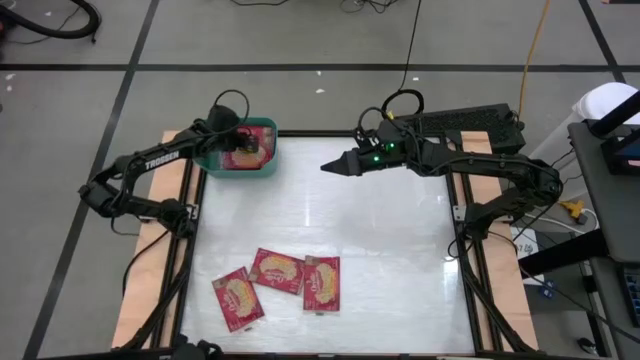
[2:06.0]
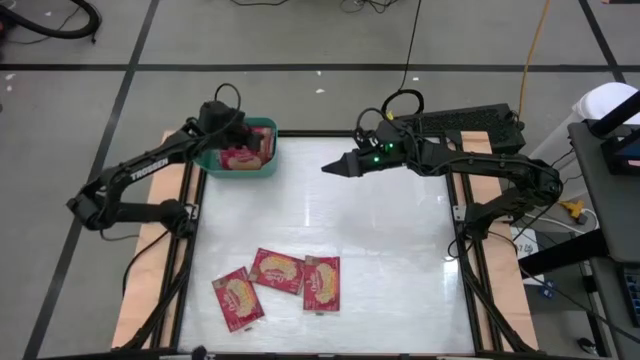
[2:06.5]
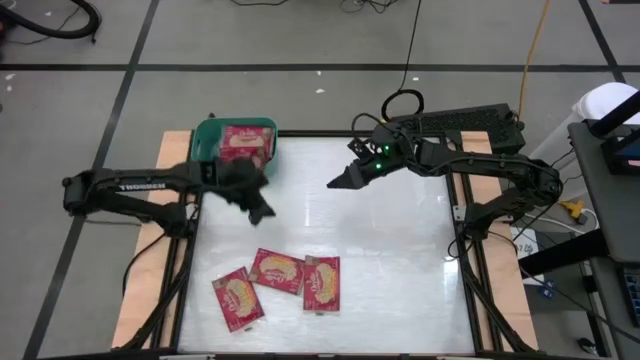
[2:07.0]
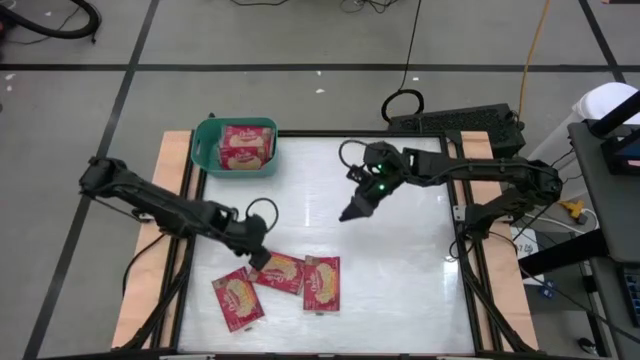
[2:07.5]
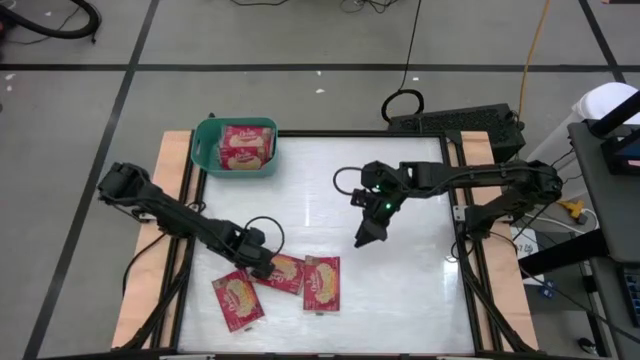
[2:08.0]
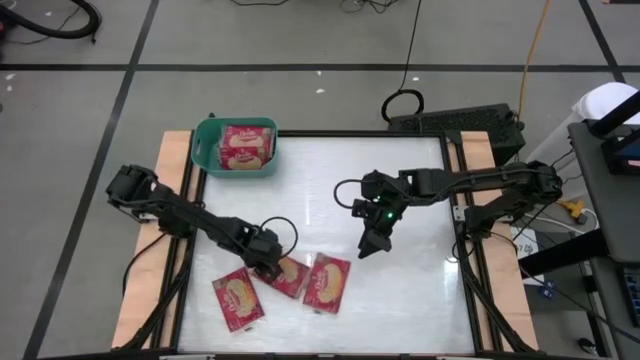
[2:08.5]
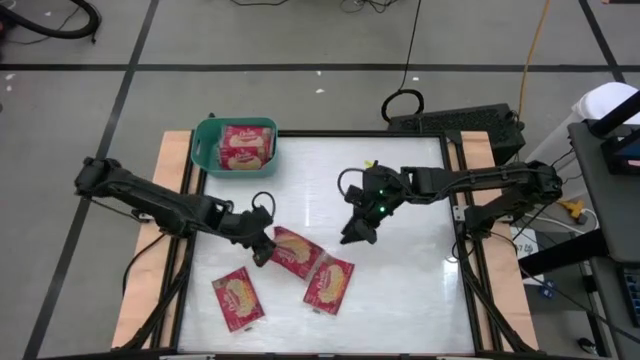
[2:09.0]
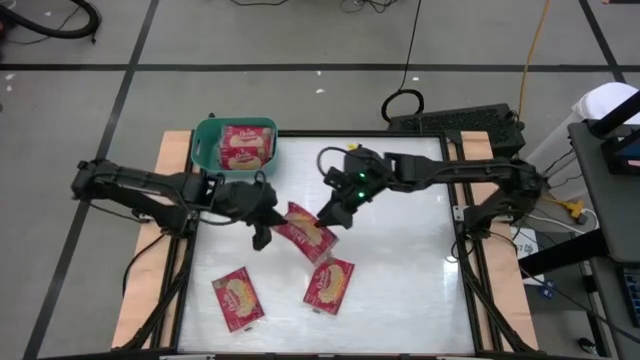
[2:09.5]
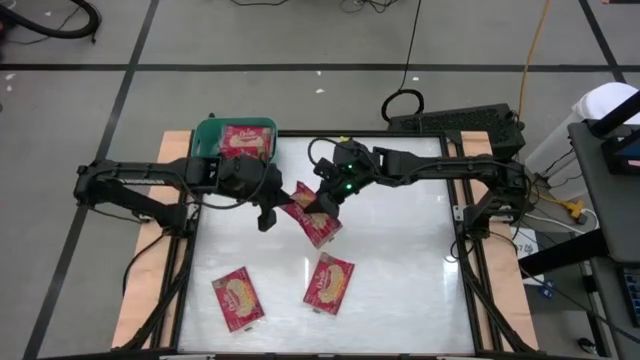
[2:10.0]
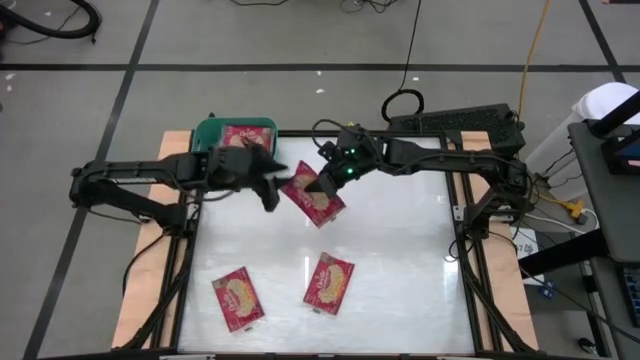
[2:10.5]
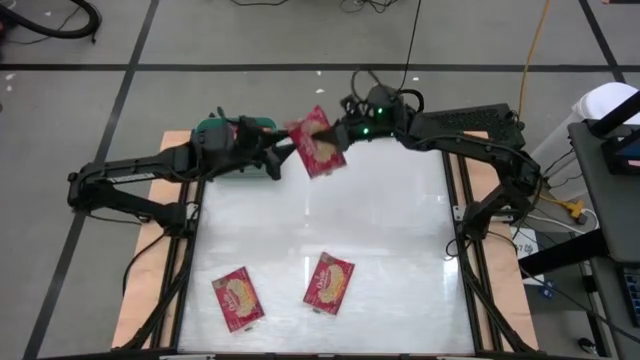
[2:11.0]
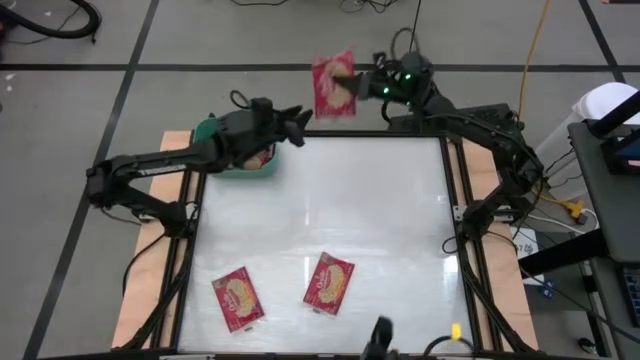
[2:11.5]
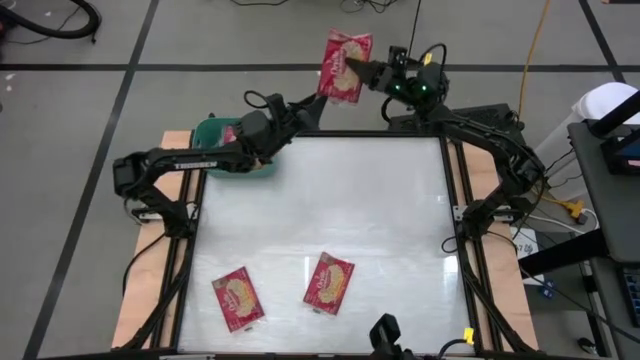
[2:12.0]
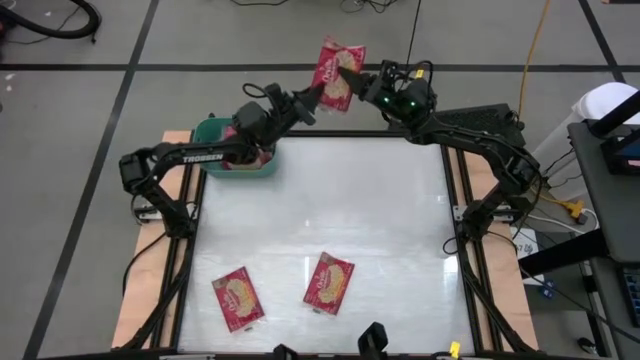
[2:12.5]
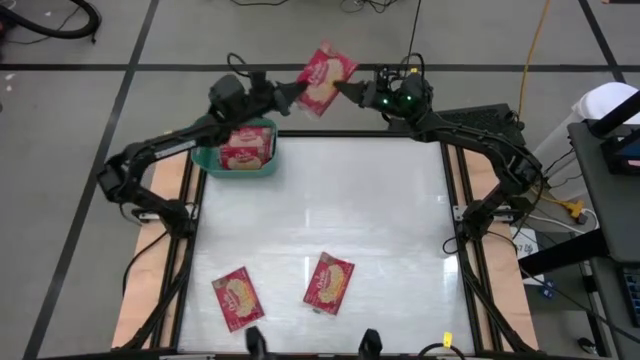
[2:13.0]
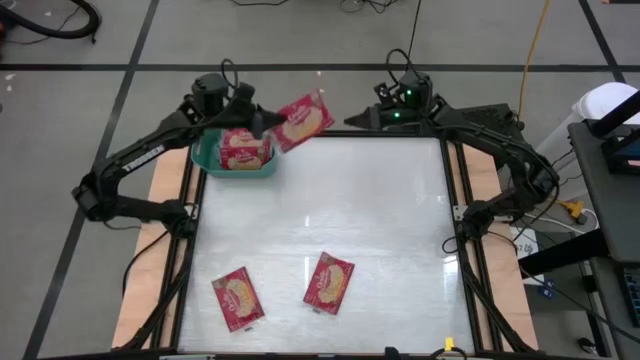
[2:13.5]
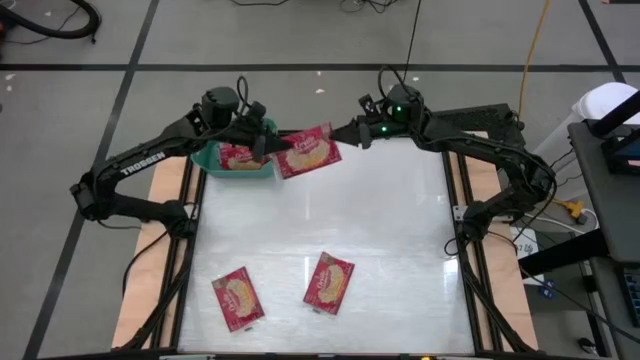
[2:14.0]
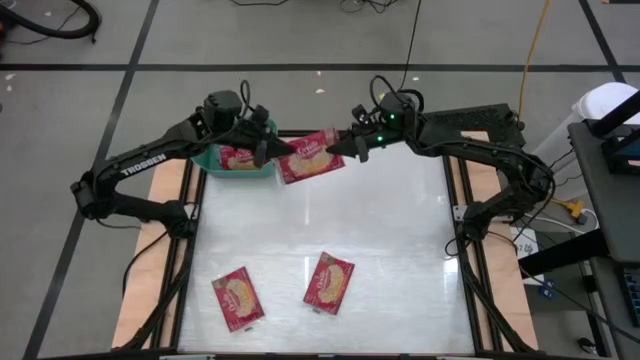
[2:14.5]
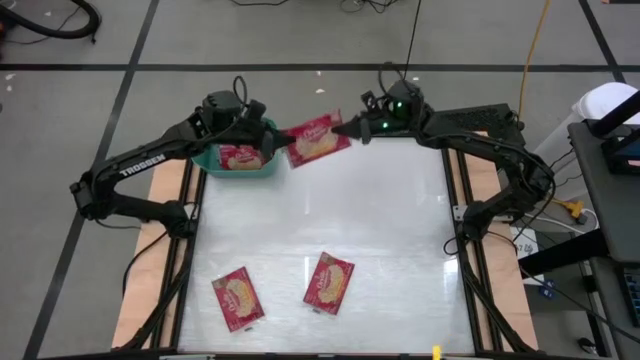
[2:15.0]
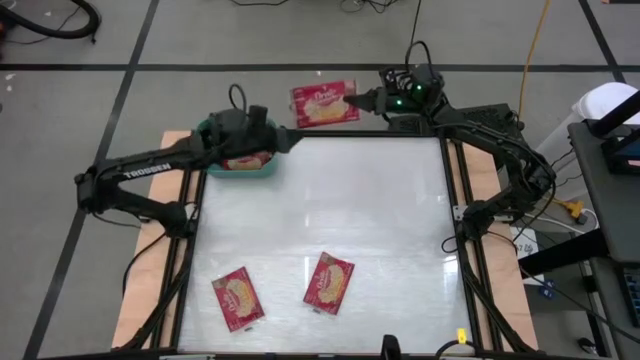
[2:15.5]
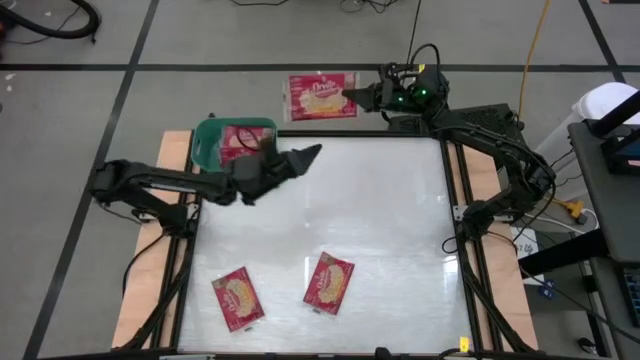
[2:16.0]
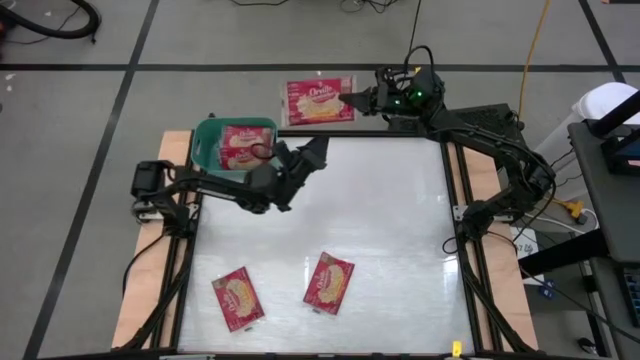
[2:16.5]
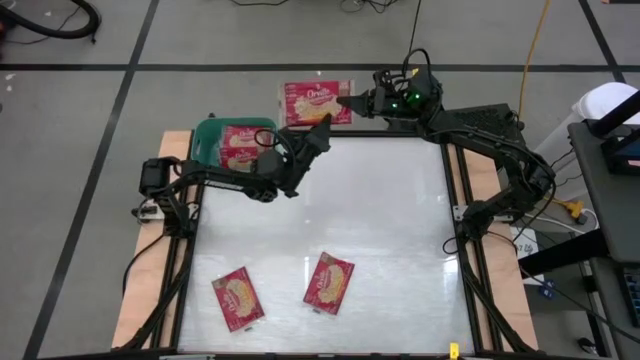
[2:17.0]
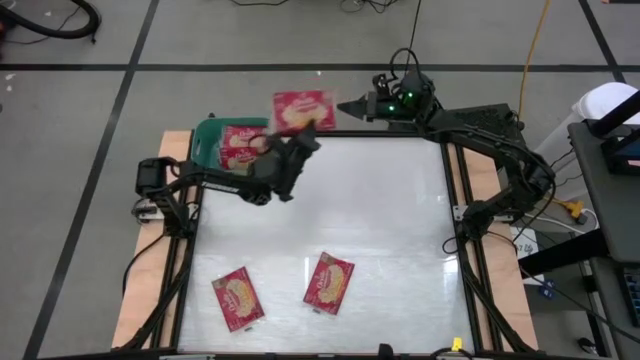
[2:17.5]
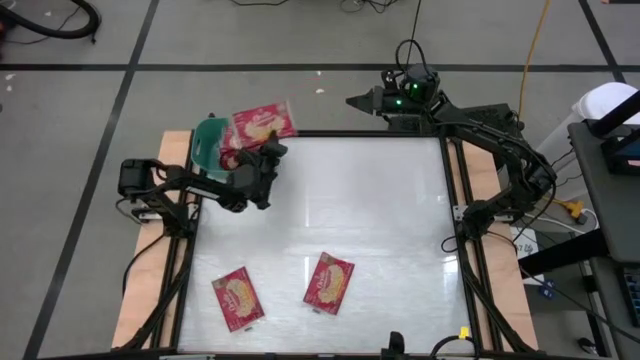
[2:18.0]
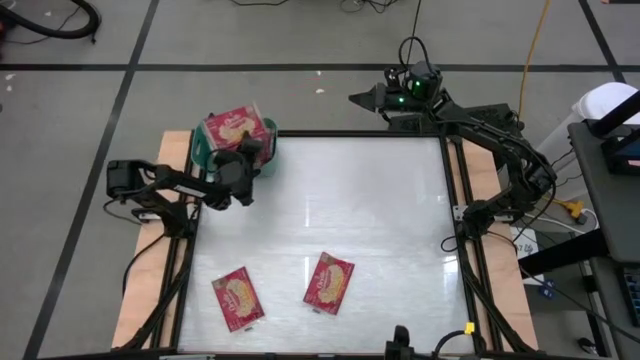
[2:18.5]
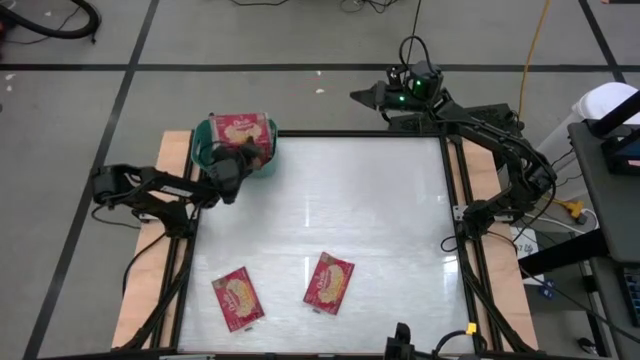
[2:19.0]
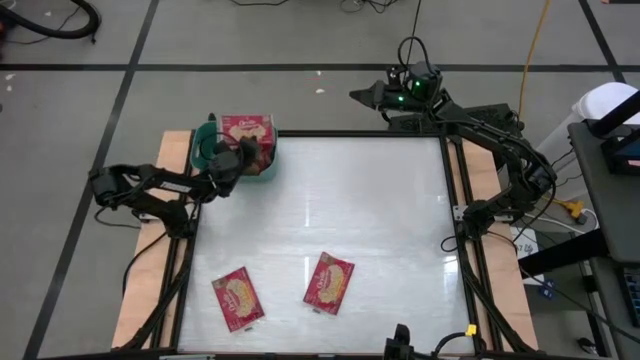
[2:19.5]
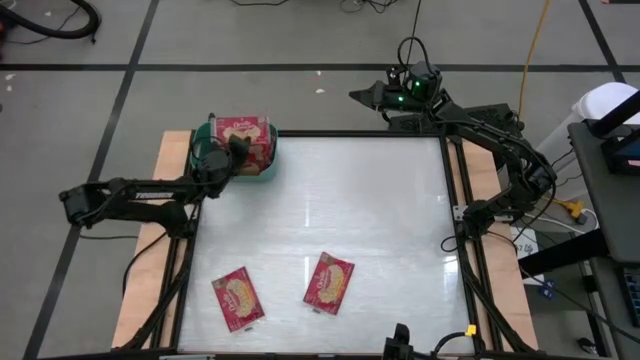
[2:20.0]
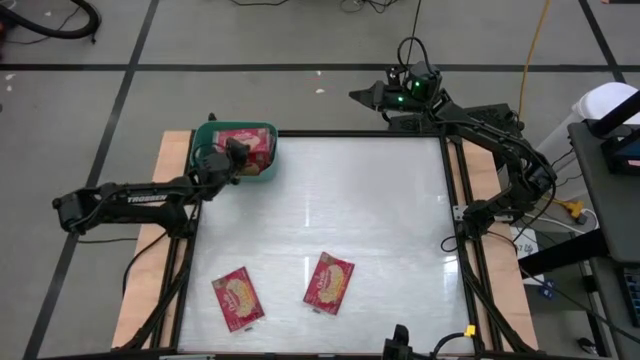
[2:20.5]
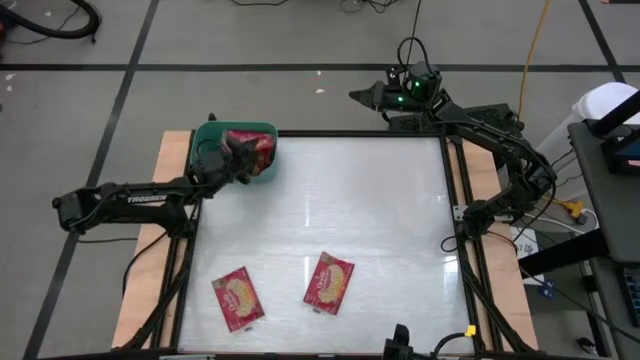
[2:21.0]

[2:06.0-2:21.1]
Task: Sort popcorn bags into baskets
Put the red popcorn bag into the green bin

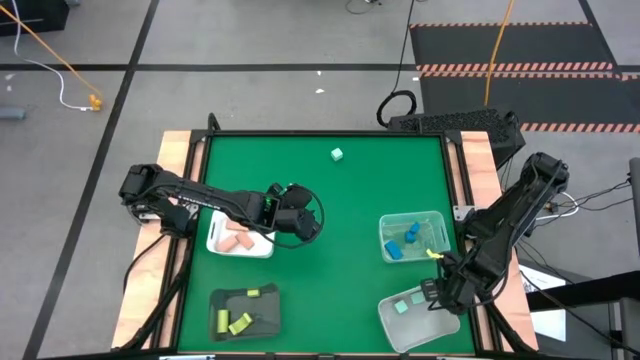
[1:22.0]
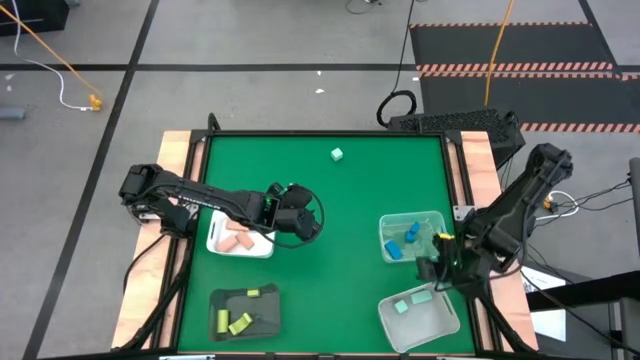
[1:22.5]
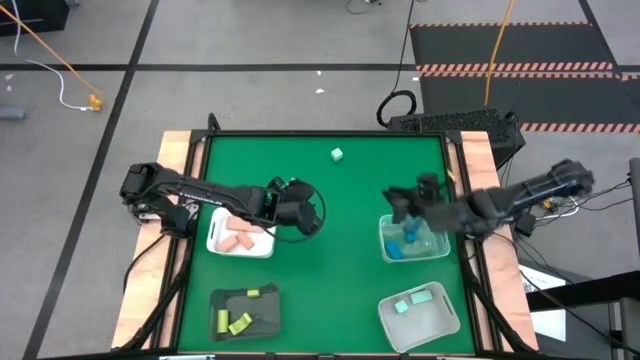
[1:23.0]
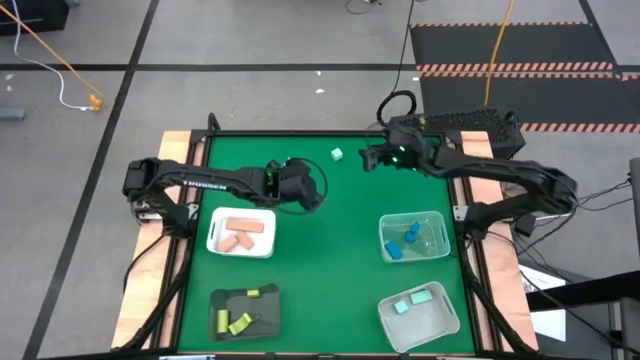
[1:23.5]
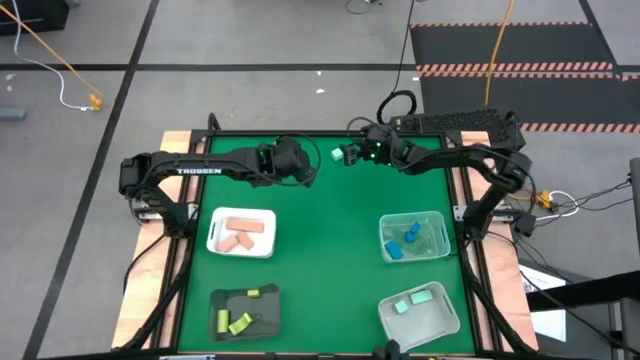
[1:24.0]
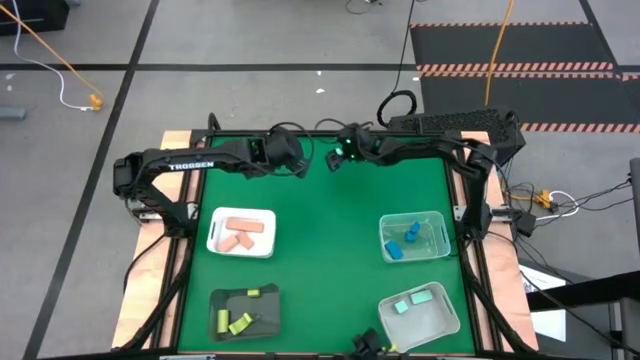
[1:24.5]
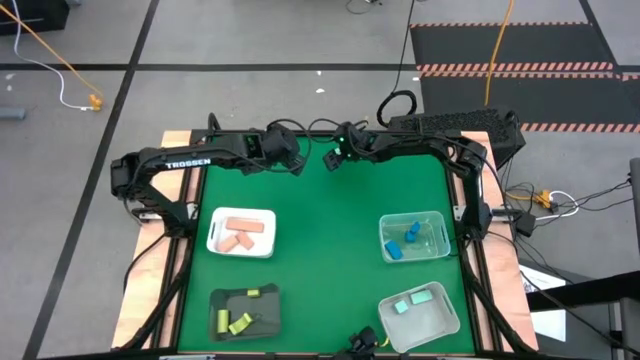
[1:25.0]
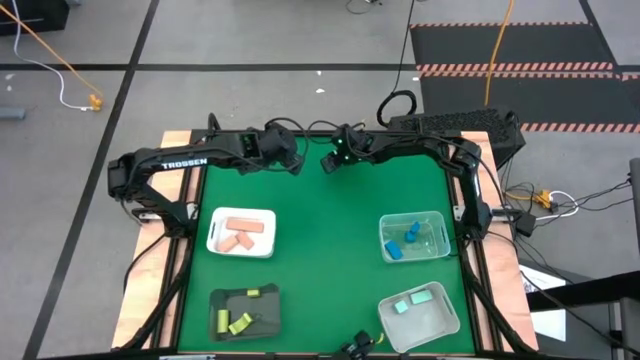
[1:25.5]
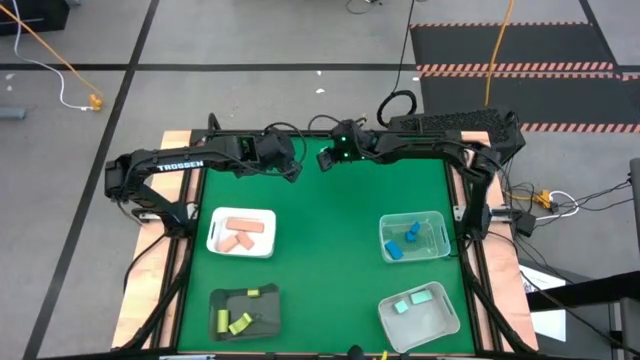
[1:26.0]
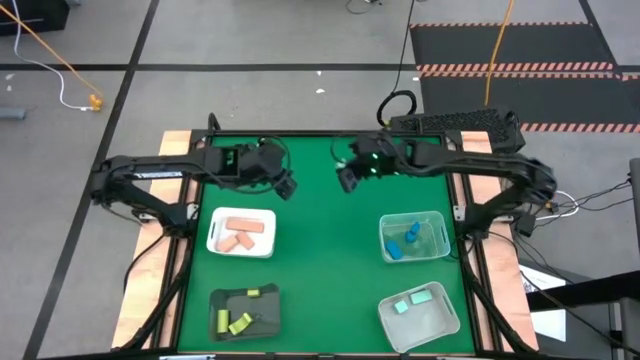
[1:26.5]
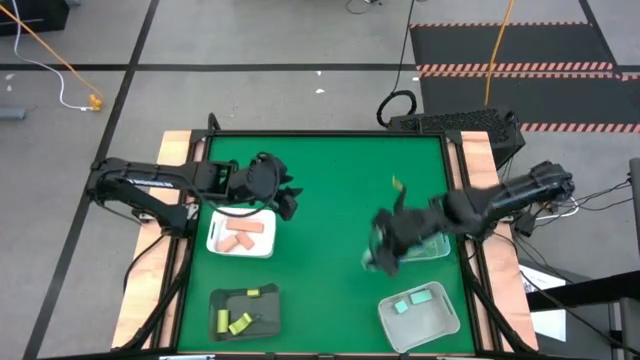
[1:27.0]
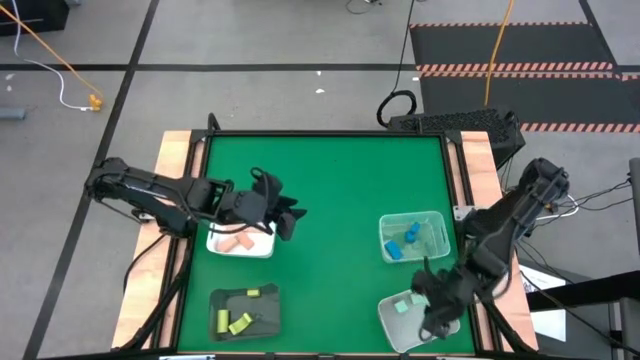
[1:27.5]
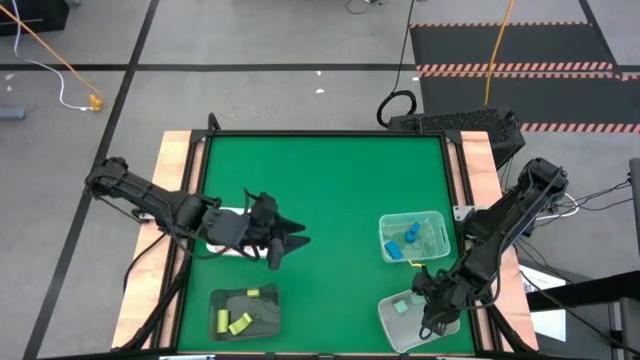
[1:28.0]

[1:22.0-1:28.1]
Task: Sort & place blocks by color
Put the light blue block into gray bin
